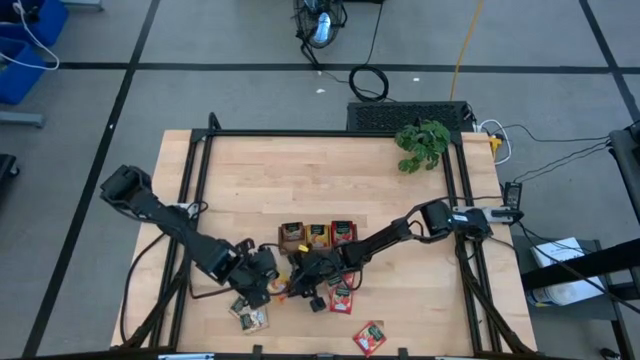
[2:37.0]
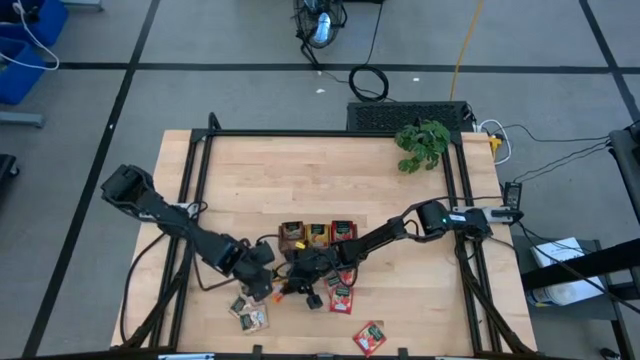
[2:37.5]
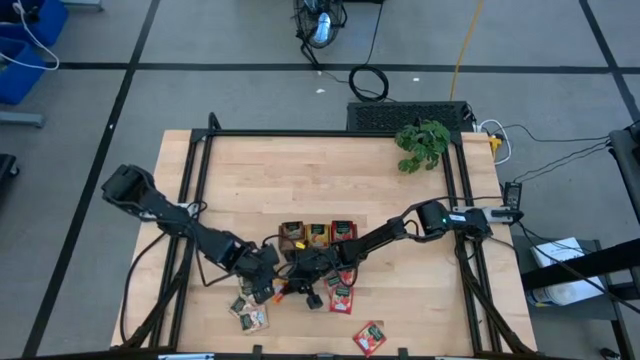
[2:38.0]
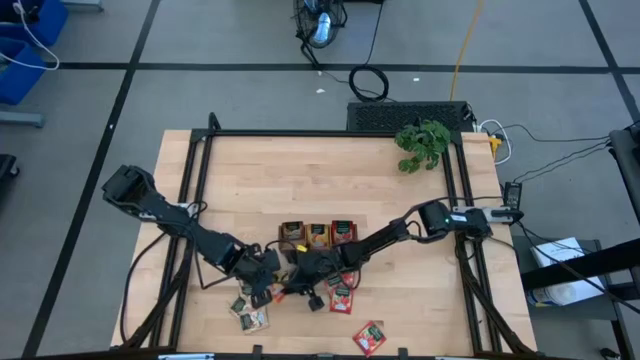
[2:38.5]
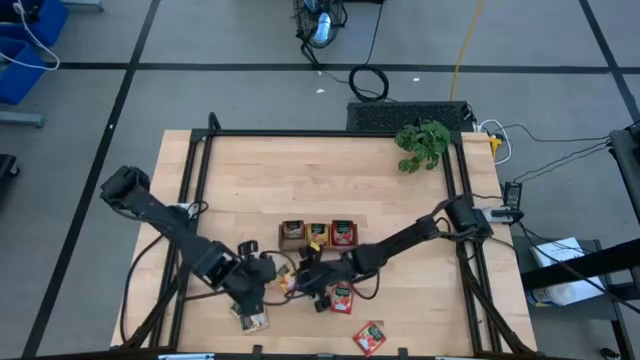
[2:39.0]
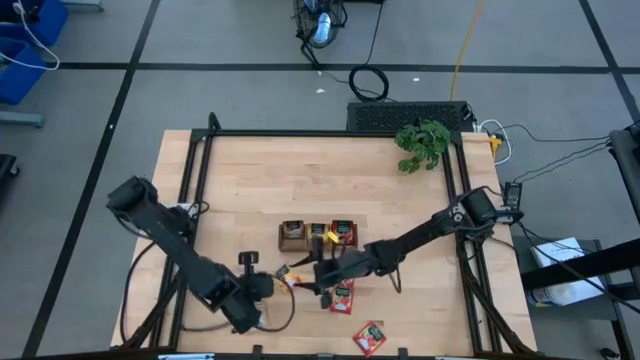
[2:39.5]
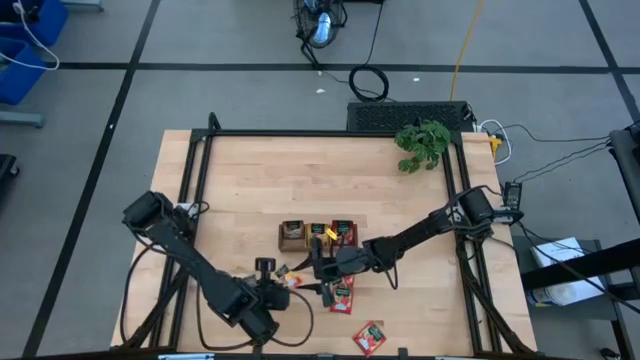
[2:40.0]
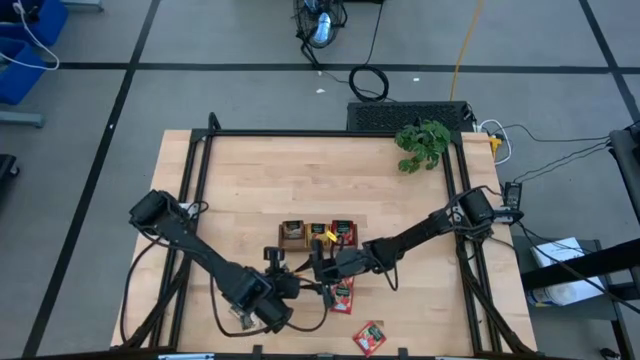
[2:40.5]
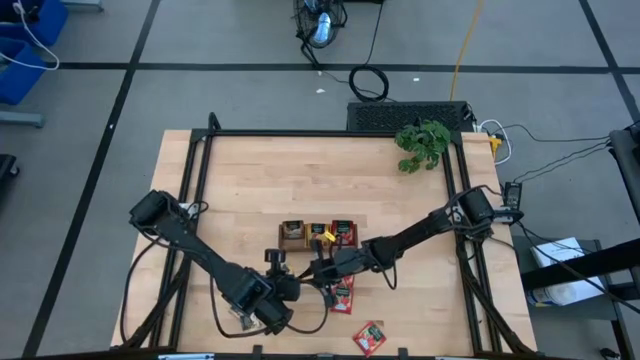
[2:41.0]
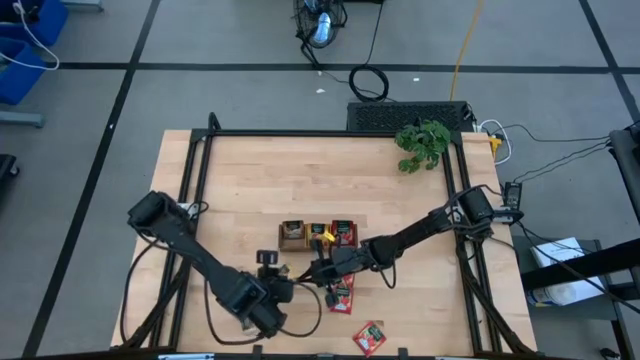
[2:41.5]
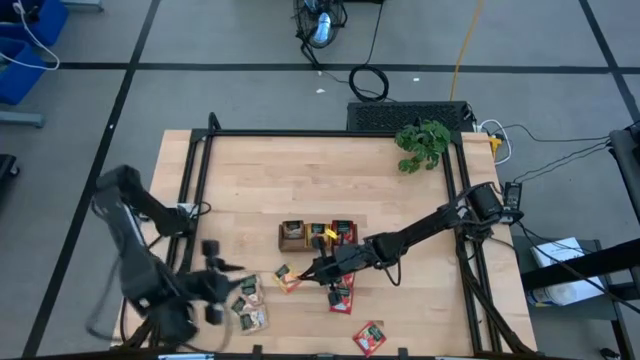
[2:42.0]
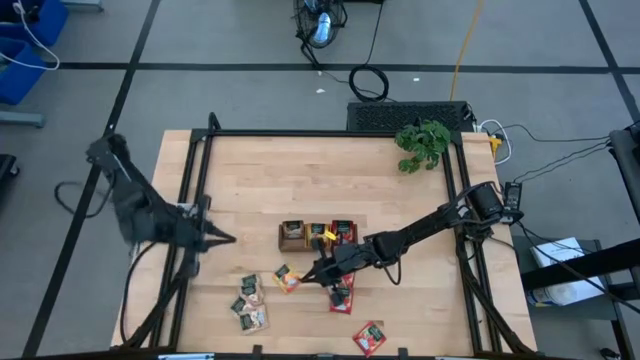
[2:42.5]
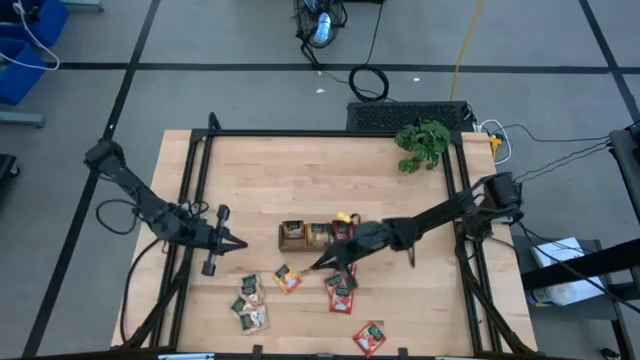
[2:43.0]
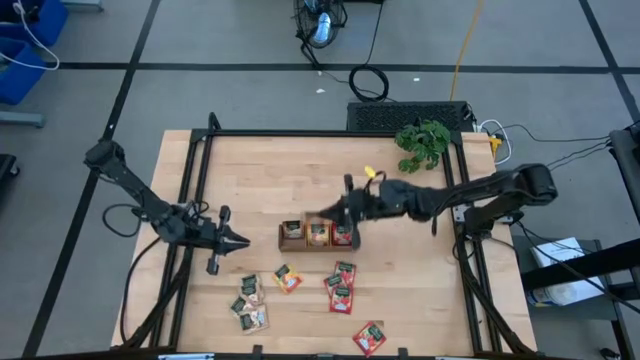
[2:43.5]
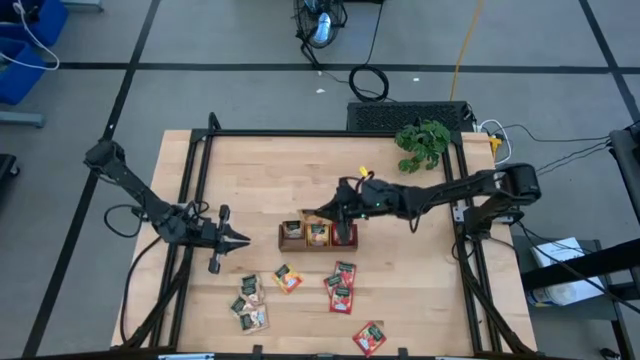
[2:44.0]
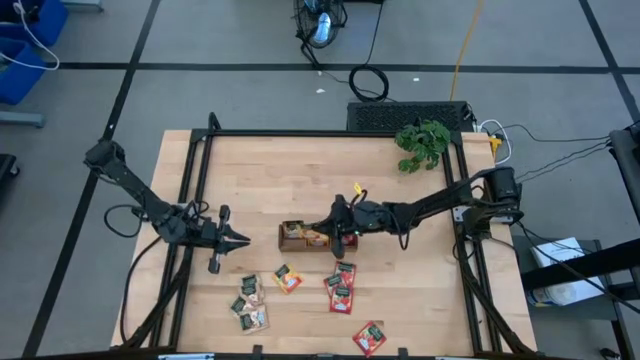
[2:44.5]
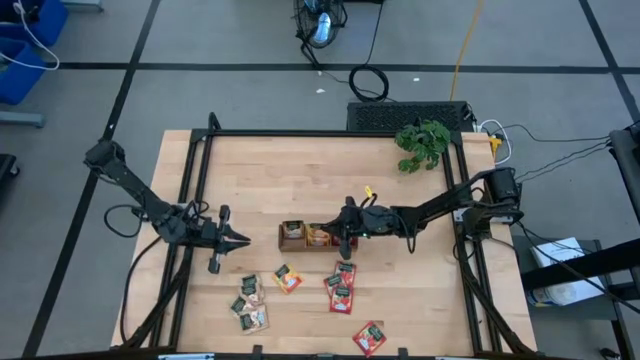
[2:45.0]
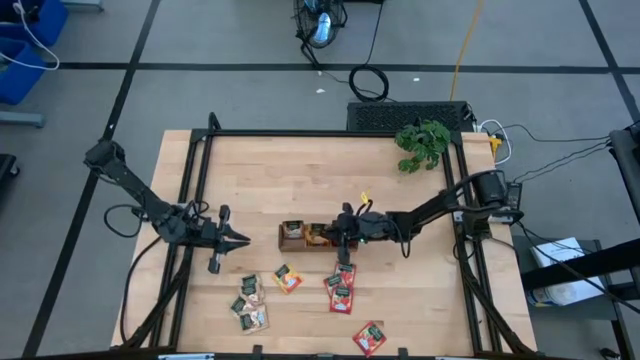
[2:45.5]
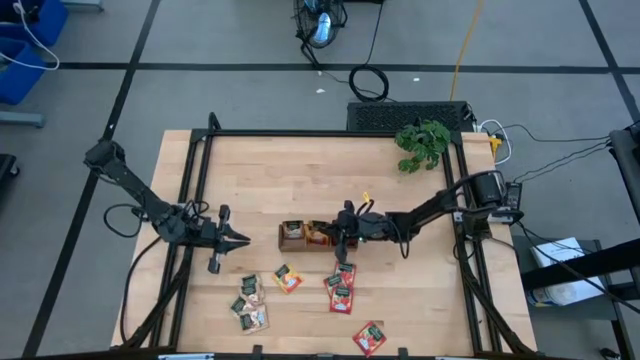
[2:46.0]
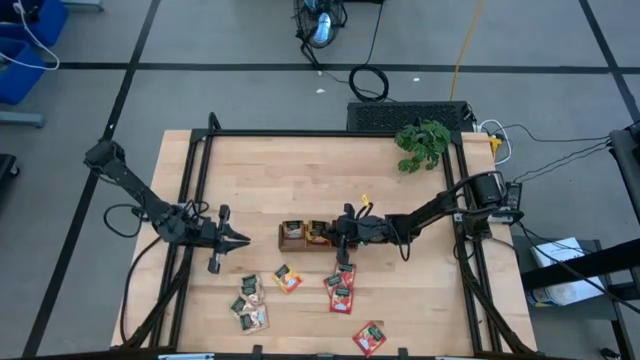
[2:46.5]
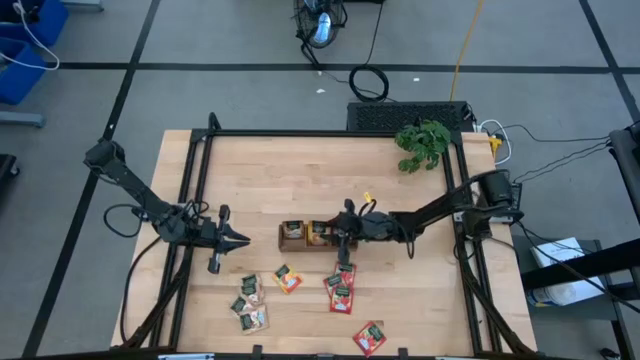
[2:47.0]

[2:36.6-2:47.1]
Task: Pick & Place Tea
Put the yellow tea bag into the left section of the wooden organizer

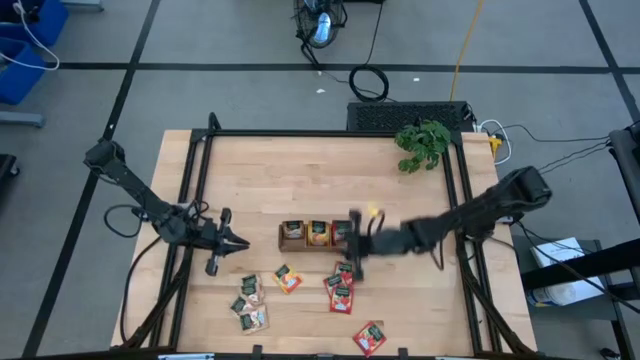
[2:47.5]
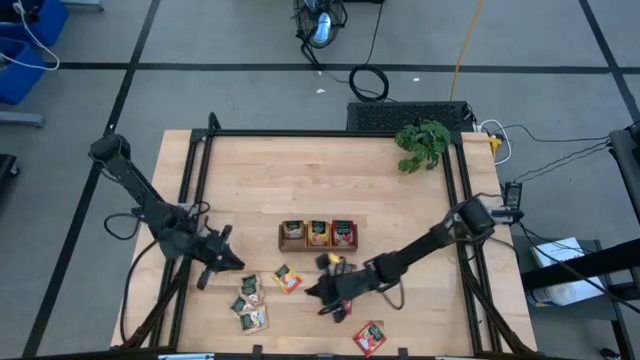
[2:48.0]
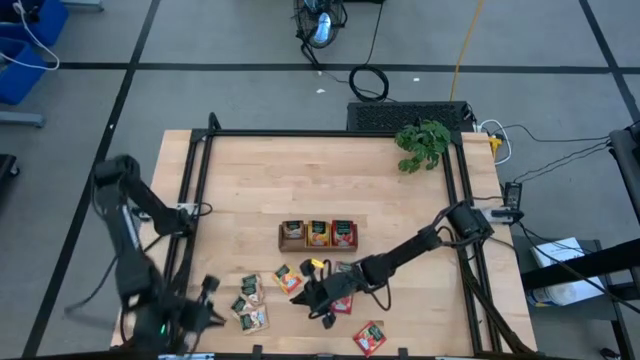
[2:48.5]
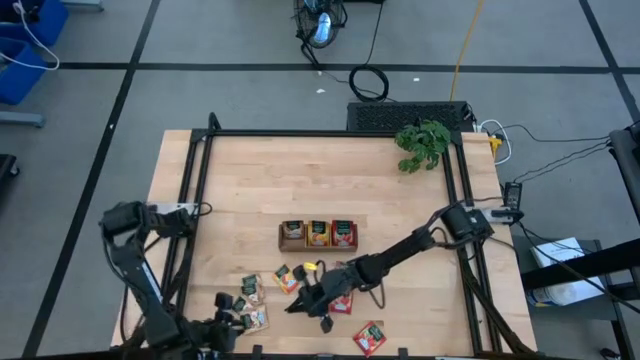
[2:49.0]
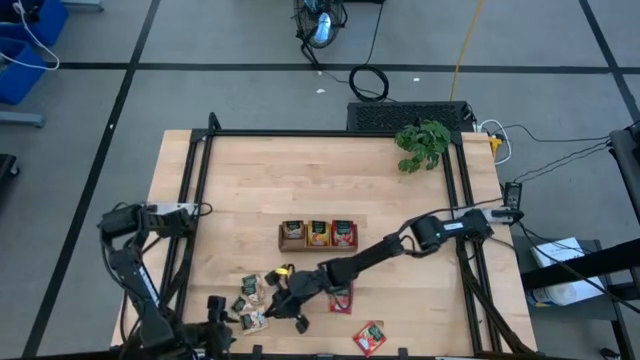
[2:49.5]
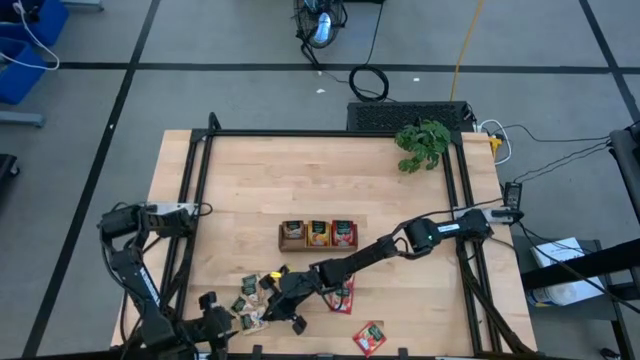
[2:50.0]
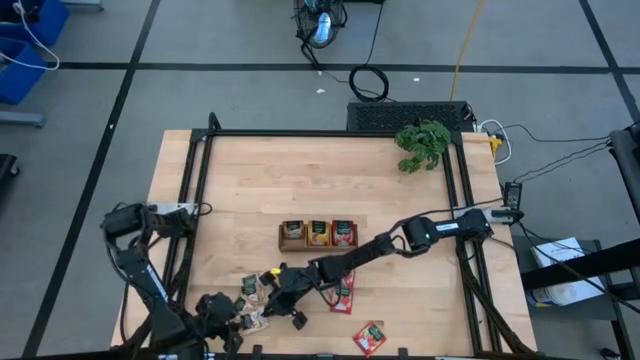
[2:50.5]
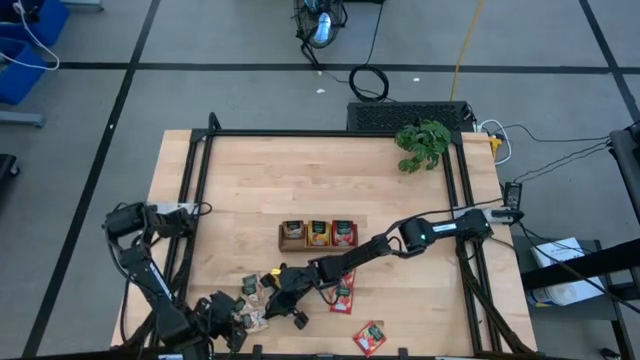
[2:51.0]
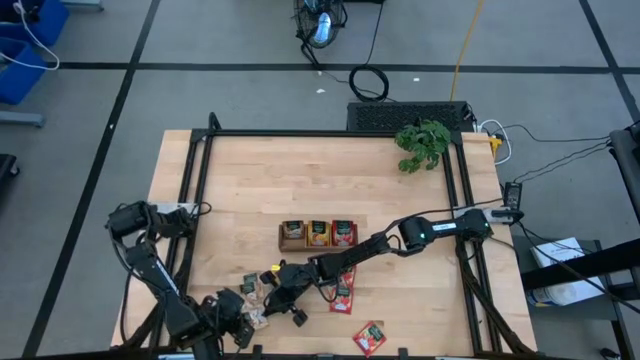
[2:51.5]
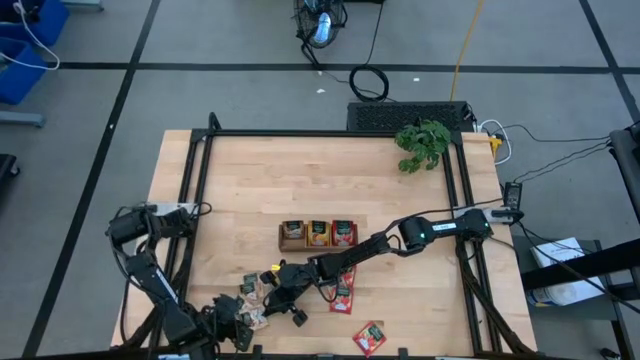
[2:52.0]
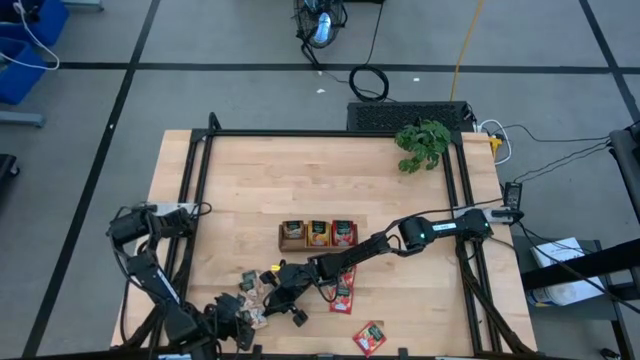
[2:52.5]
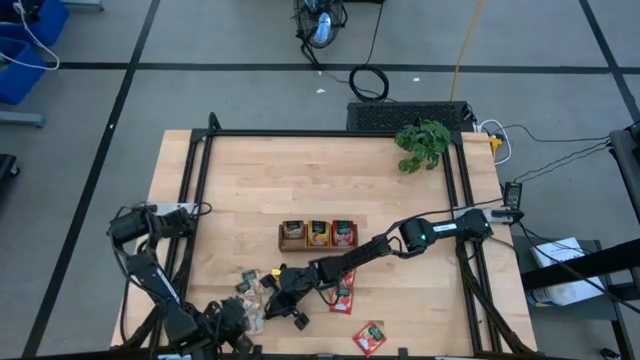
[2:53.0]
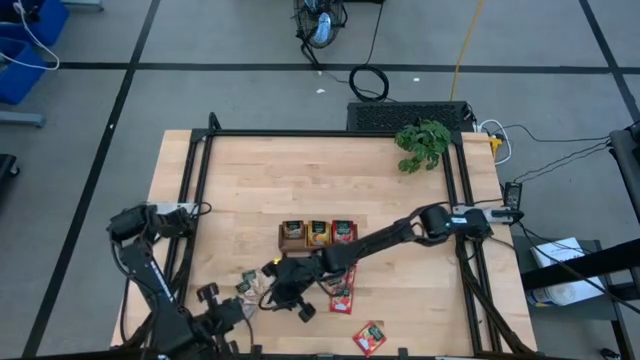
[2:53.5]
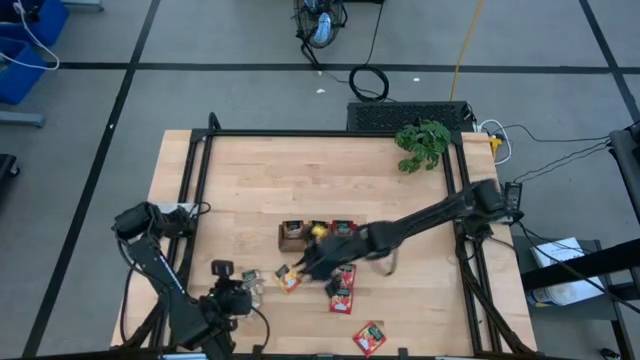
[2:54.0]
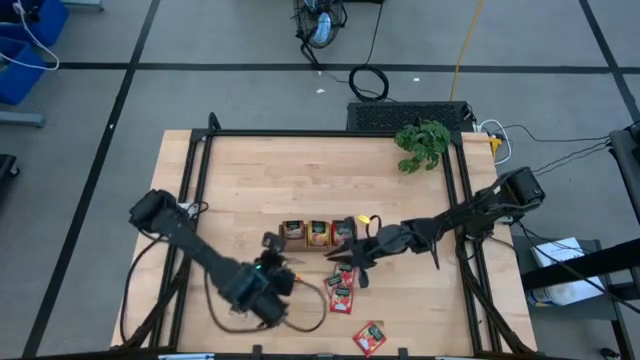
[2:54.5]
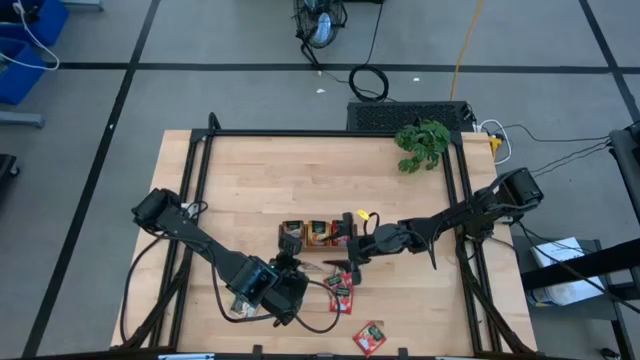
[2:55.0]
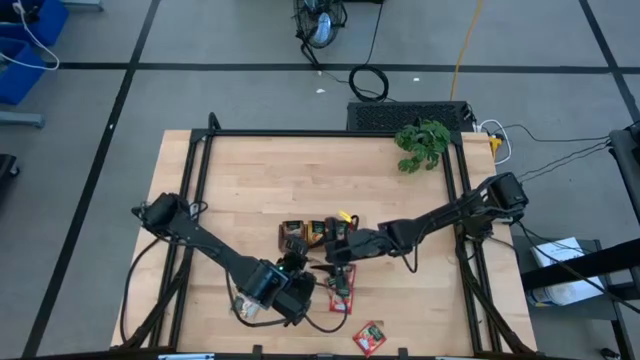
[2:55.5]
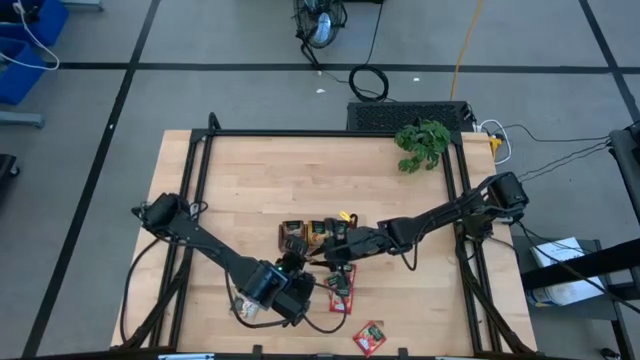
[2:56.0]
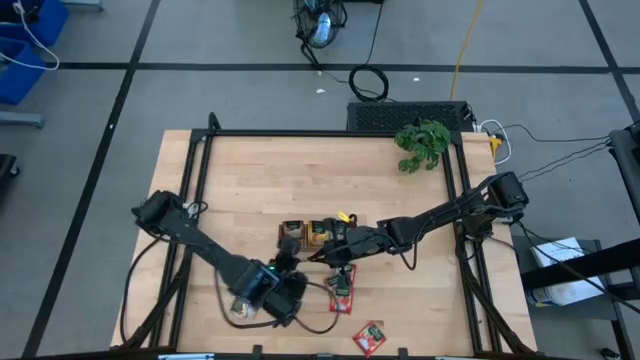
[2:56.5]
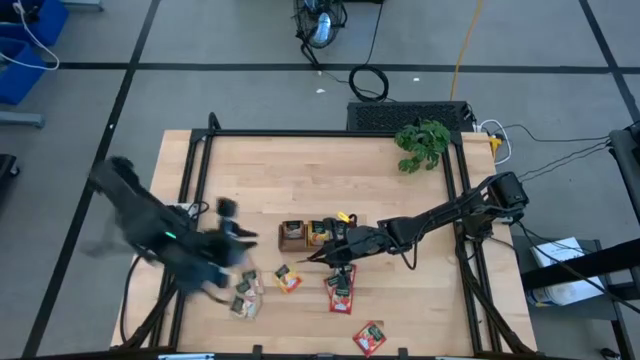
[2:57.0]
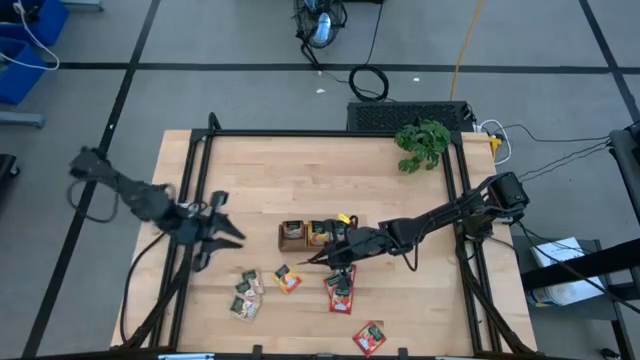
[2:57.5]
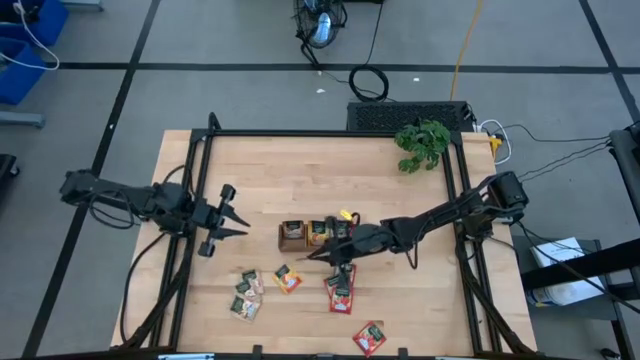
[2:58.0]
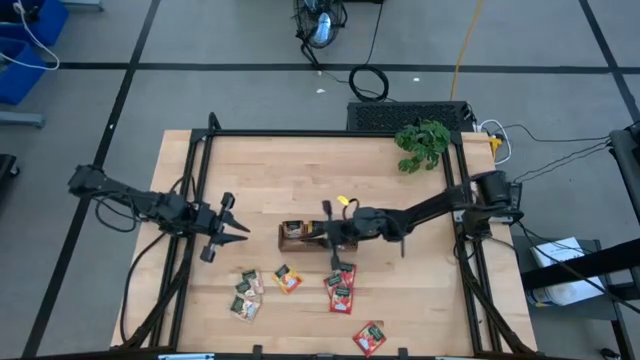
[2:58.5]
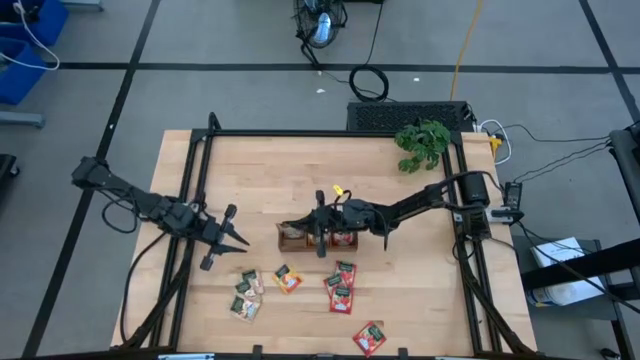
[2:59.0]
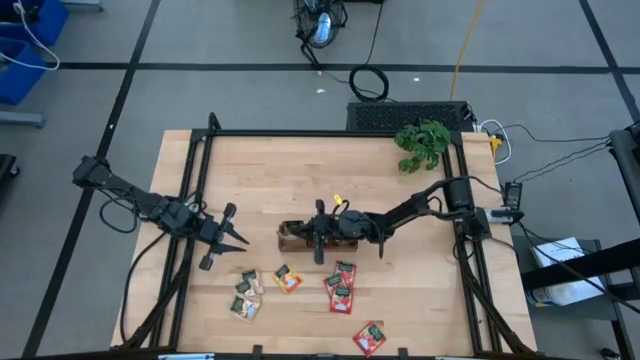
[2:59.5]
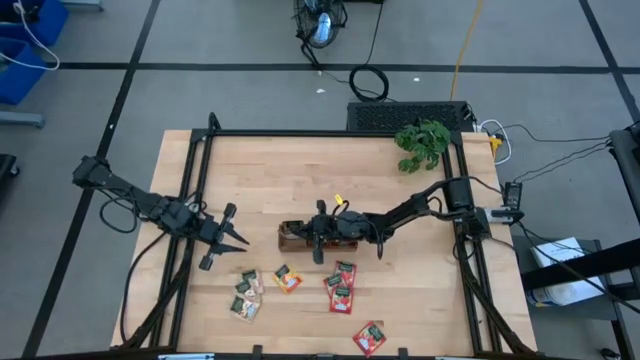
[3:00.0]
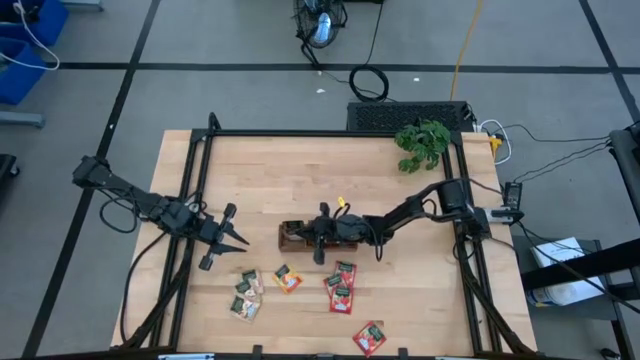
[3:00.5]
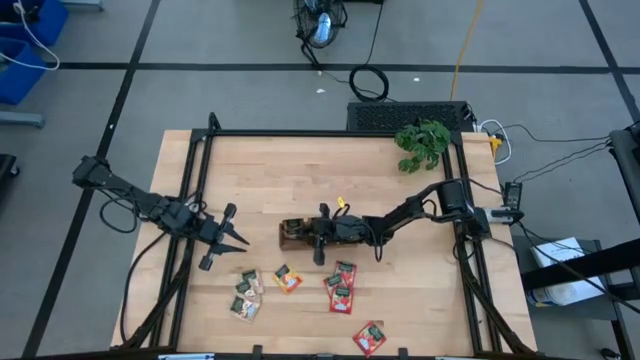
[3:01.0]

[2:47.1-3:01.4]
Put the brown tea bag into the left section of the wooden organizer
